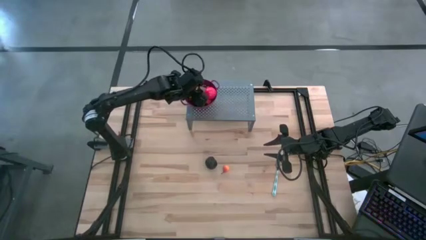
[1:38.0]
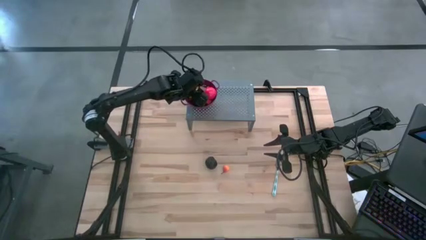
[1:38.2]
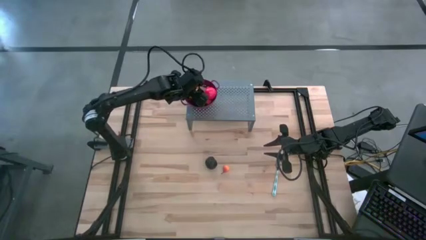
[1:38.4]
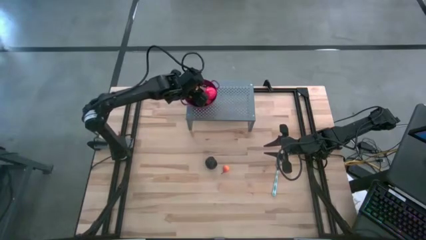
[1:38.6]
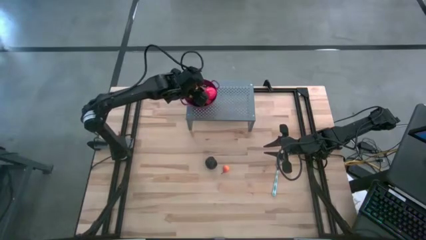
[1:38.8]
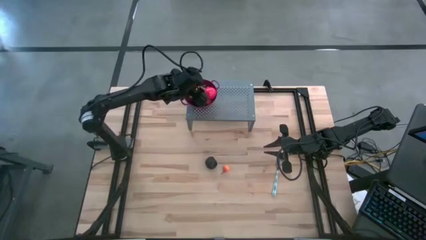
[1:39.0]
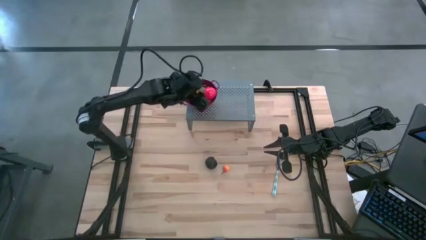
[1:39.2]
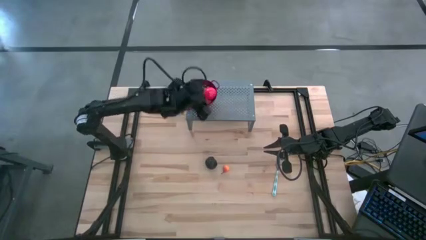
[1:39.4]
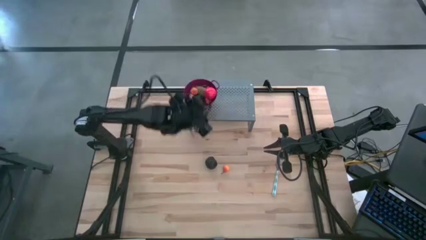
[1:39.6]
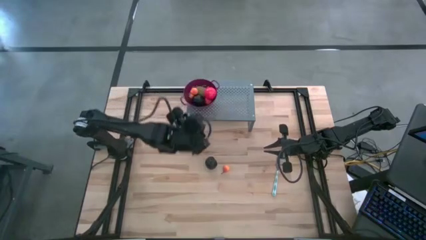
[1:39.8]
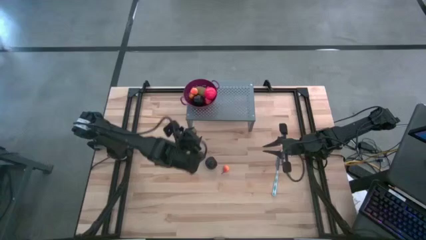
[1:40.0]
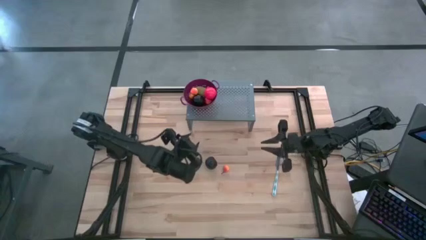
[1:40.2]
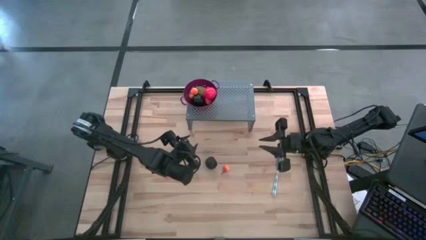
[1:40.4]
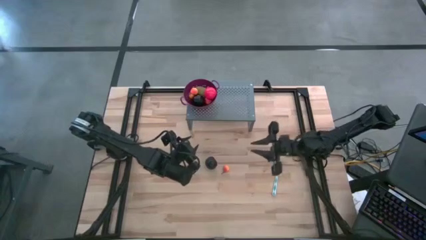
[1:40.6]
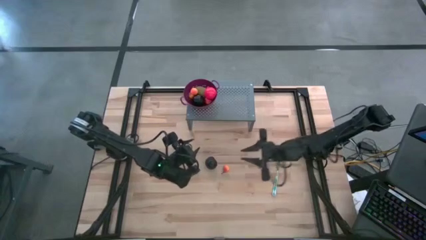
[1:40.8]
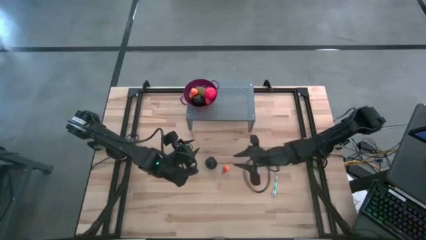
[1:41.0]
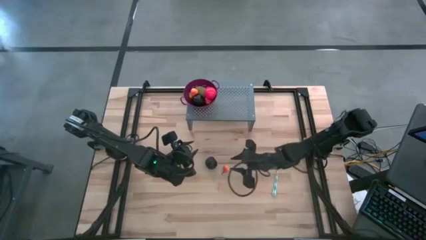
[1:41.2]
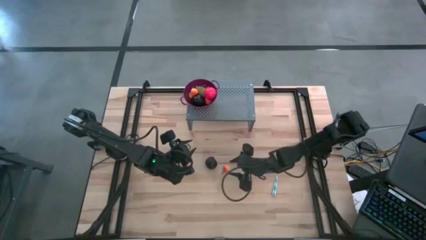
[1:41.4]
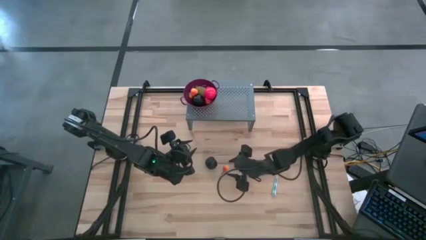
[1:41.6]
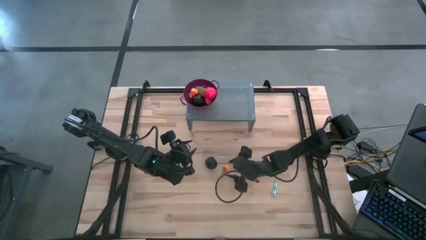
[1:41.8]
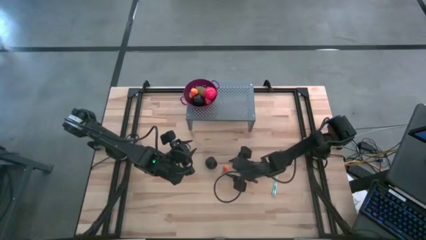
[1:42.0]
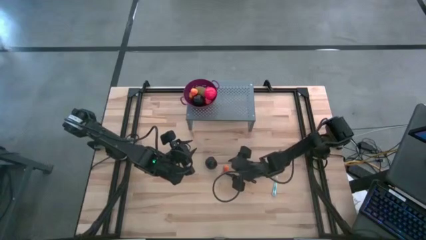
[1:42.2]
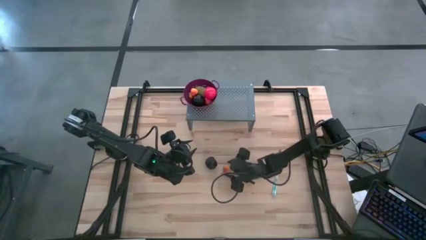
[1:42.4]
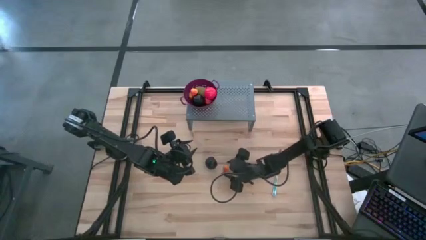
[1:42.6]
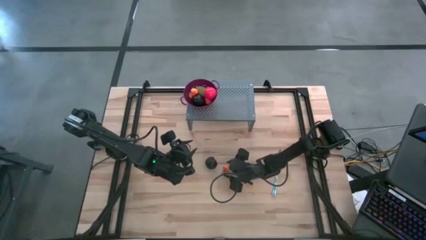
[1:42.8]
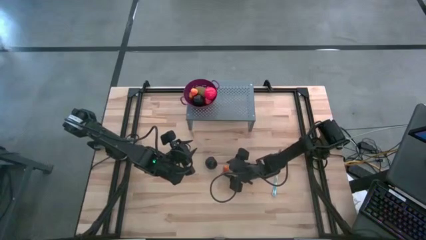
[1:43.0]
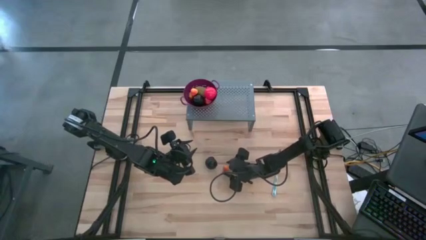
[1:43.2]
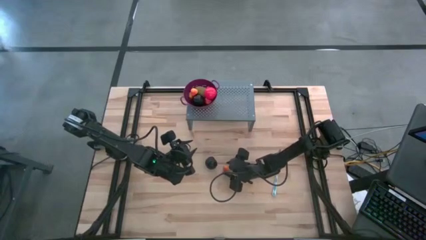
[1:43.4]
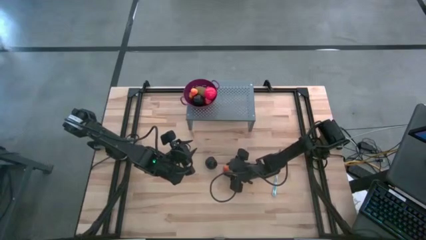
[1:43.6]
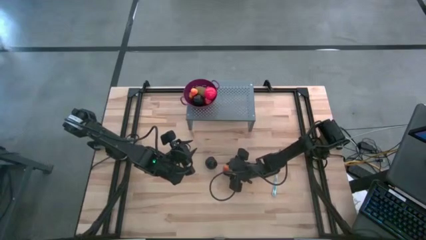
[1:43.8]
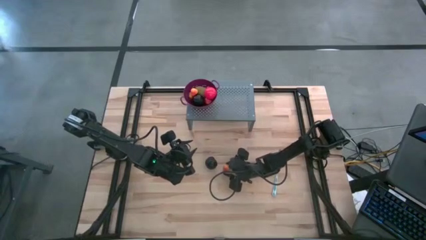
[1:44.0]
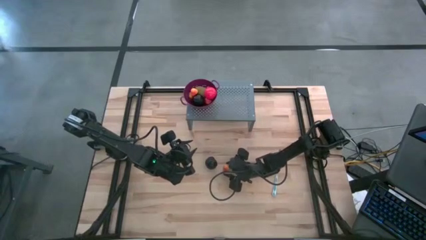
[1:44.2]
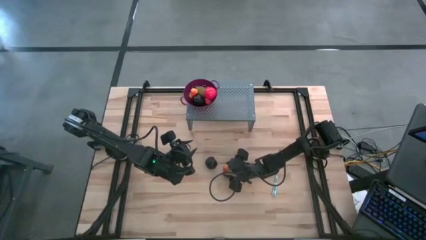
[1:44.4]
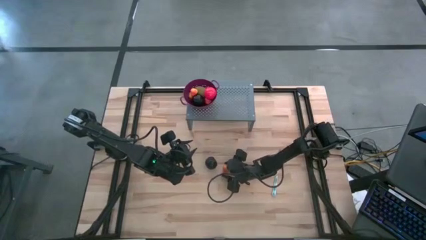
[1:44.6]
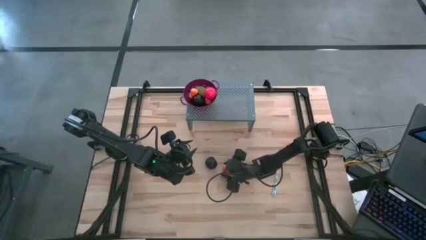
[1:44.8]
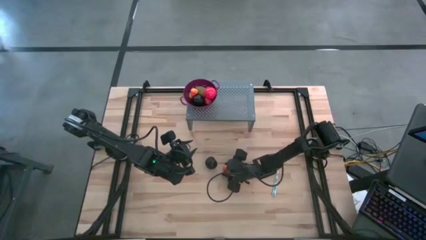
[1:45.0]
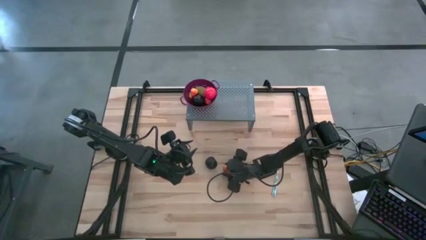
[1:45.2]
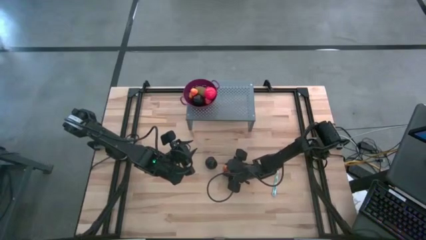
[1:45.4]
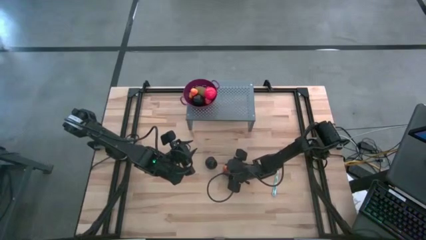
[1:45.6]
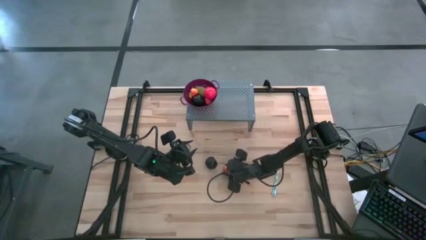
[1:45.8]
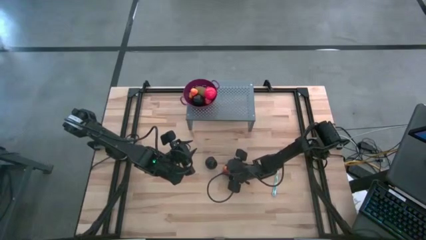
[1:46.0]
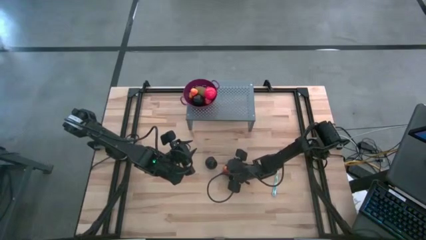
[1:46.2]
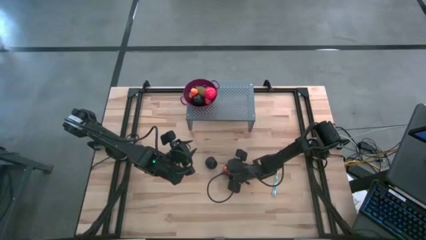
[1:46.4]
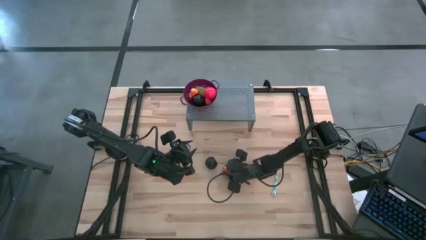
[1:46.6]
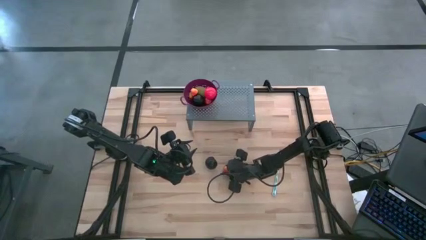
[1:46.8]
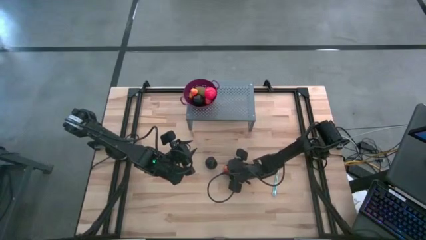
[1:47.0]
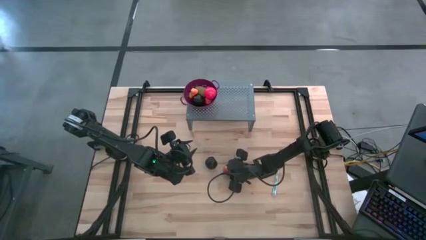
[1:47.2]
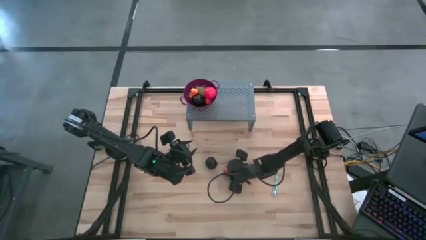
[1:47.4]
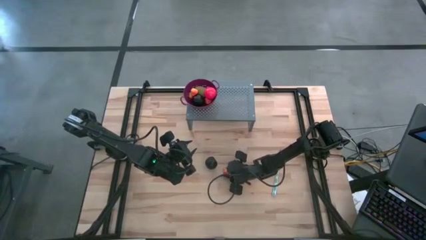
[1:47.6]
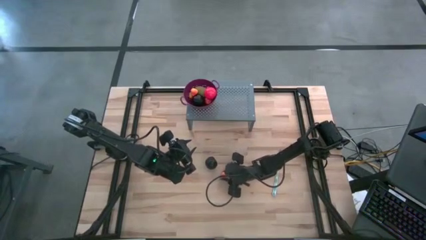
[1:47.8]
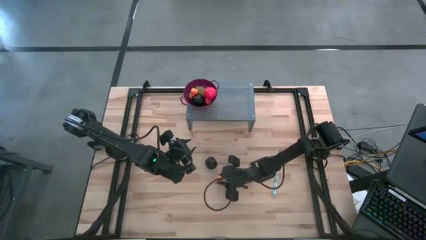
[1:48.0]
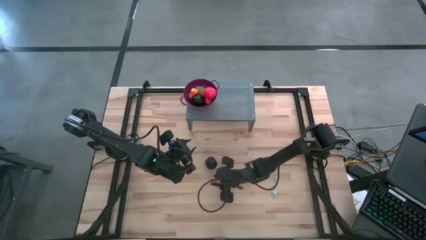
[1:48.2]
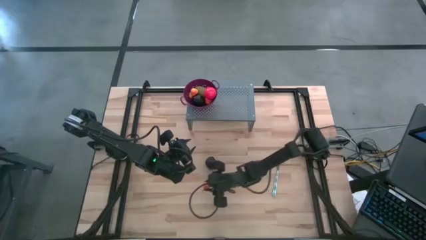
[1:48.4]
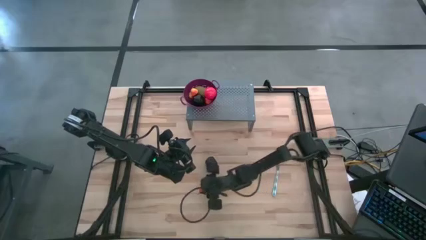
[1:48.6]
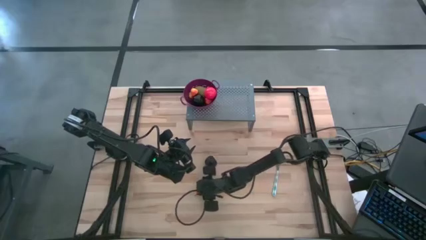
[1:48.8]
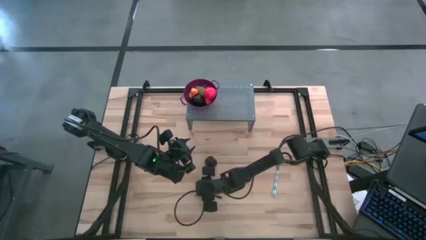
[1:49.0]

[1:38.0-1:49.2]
Task: Pick & Place Fruit
Put the yellow pear into the purple strainer bowl on the shelf

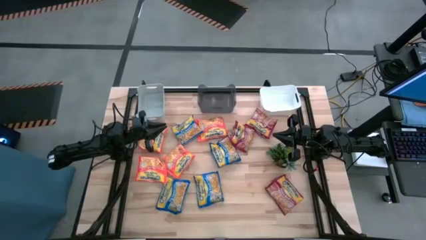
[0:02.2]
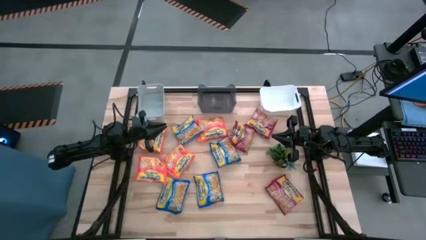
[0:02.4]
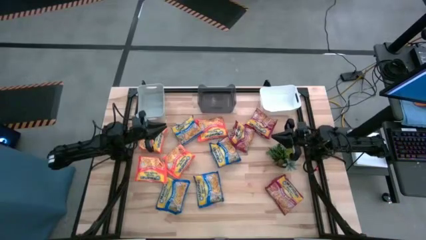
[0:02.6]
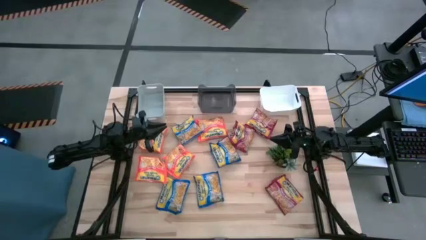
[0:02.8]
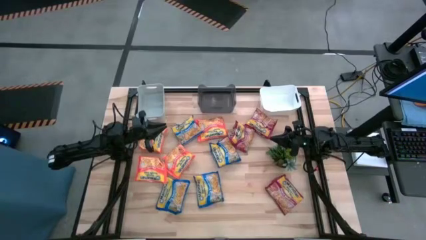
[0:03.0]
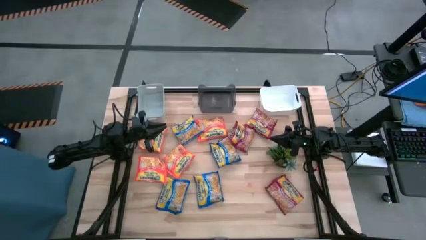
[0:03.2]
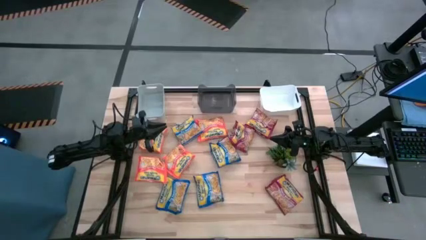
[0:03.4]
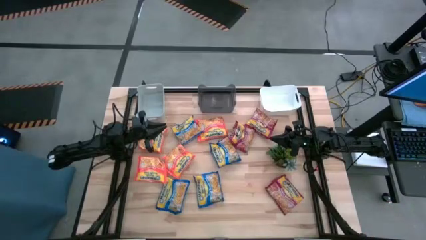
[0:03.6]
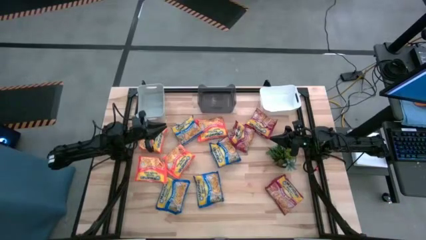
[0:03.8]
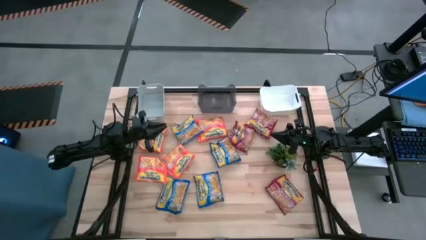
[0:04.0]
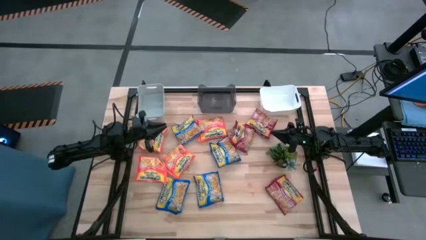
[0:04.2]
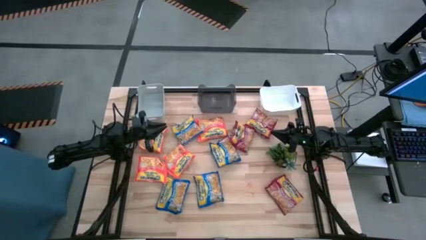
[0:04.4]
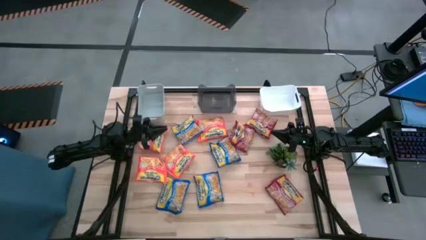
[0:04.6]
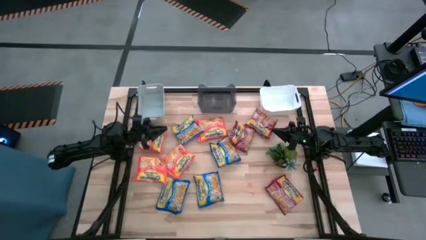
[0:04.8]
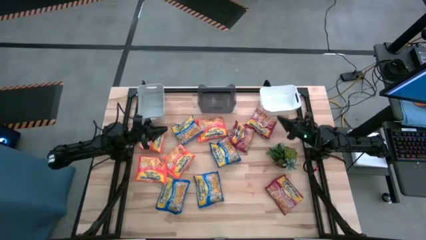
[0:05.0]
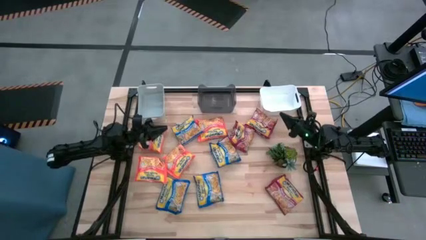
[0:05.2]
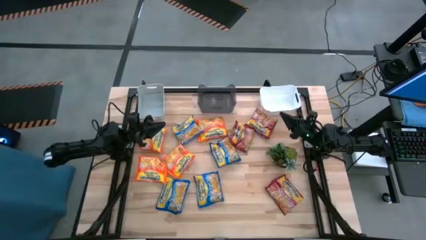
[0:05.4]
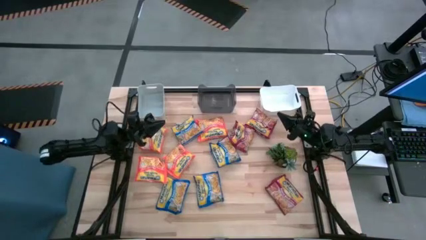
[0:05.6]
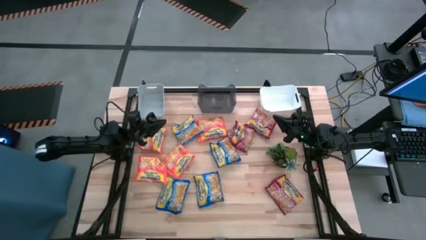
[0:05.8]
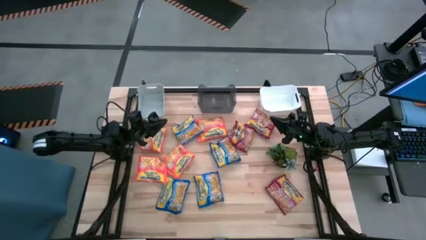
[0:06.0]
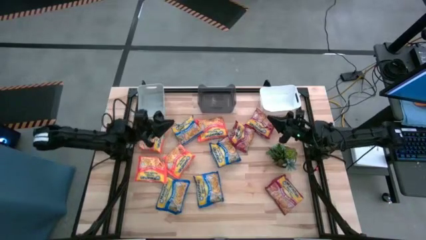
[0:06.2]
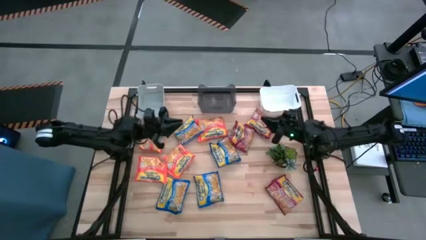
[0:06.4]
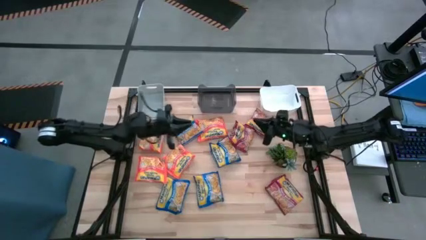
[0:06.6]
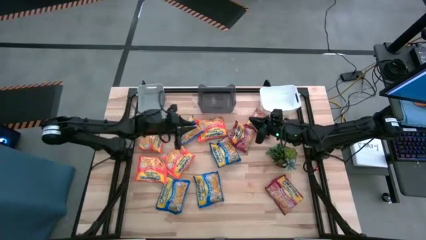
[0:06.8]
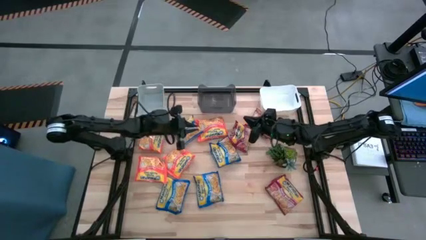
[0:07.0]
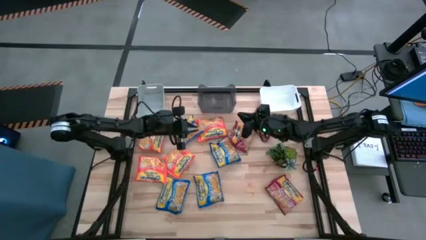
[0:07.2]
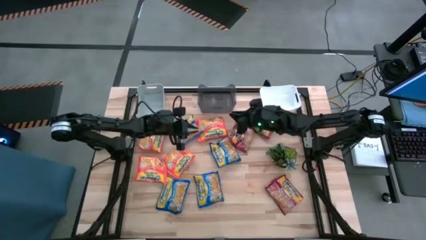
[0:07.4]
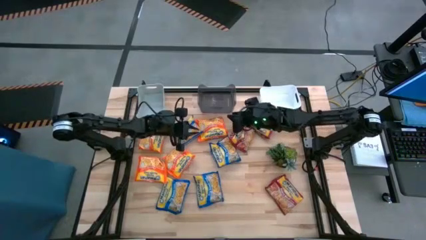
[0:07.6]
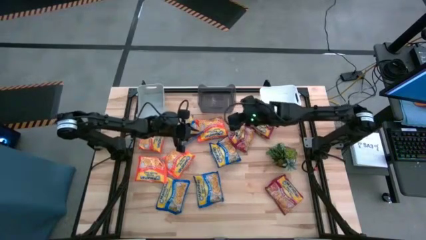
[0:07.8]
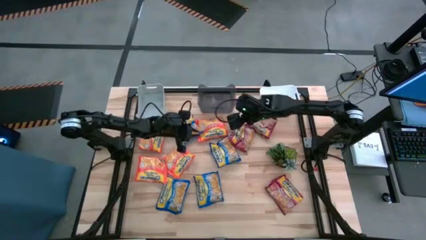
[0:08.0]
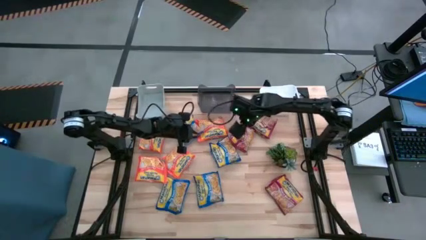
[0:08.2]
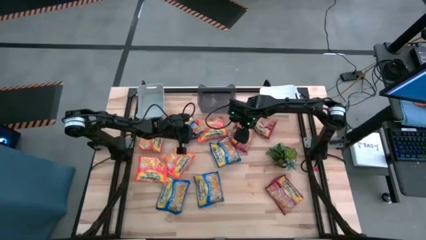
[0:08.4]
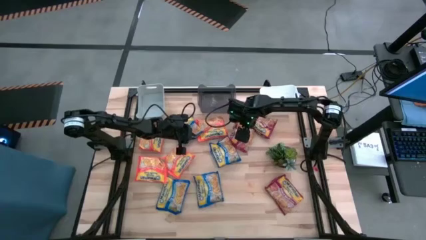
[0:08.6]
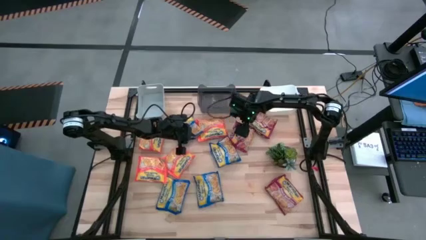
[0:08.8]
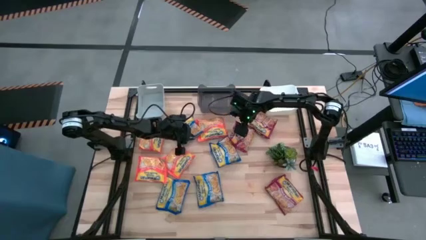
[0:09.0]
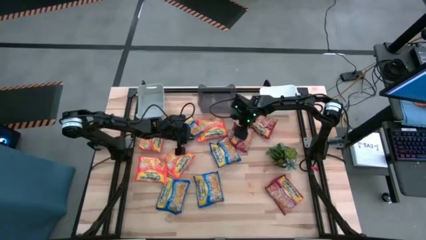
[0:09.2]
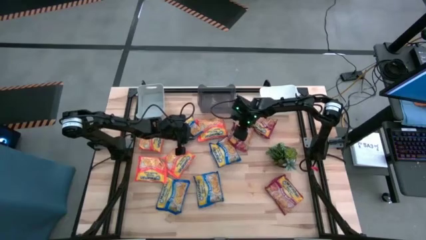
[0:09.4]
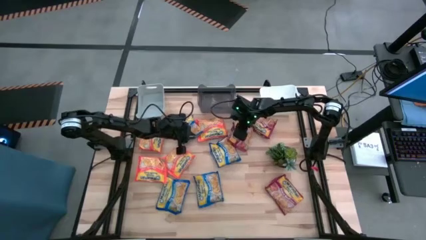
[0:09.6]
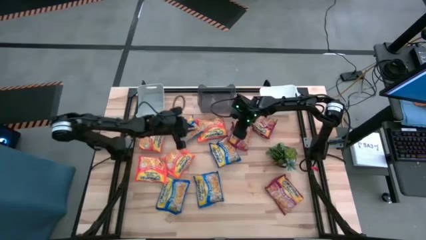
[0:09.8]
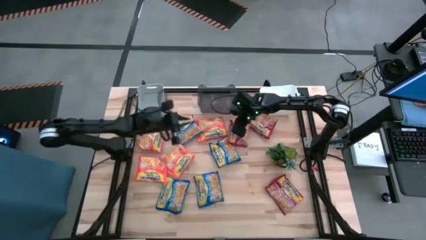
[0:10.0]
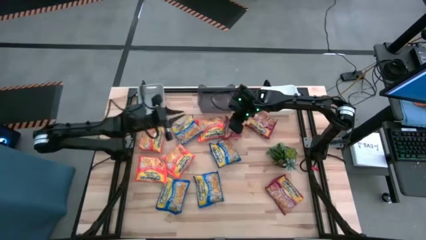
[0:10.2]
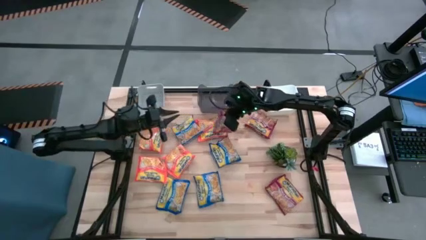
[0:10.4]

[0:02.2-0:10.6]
Task: Sort Maruchan noodles
Put the red noodle pack into the black bin
